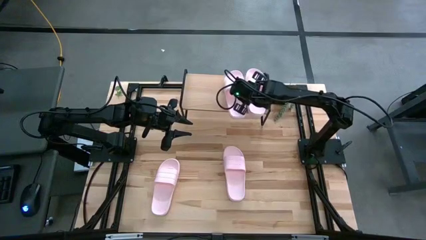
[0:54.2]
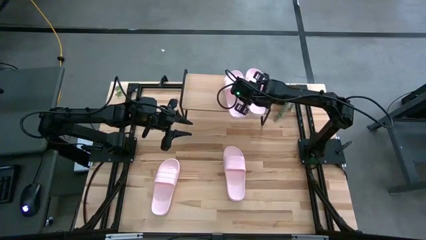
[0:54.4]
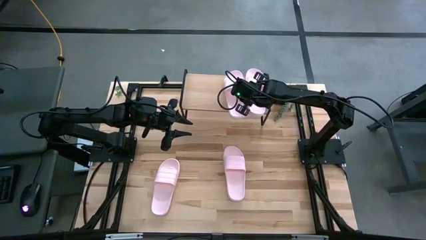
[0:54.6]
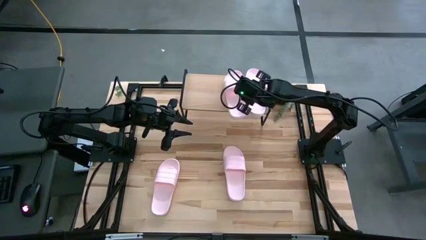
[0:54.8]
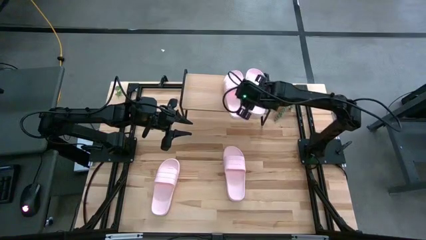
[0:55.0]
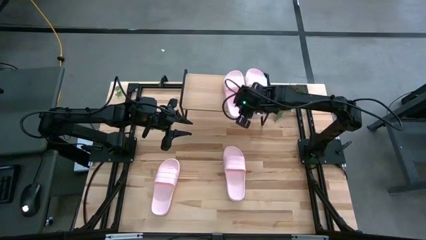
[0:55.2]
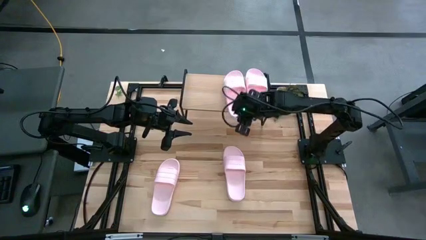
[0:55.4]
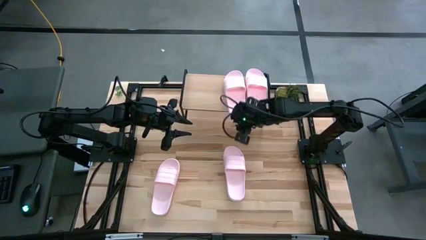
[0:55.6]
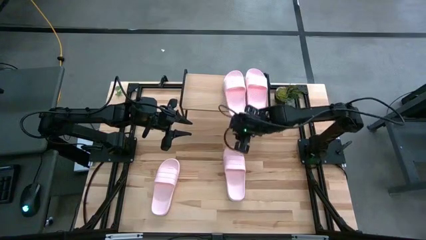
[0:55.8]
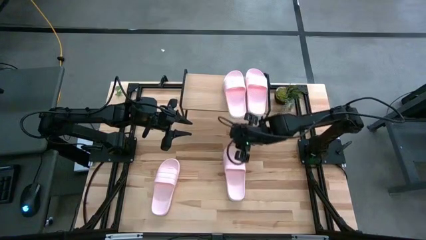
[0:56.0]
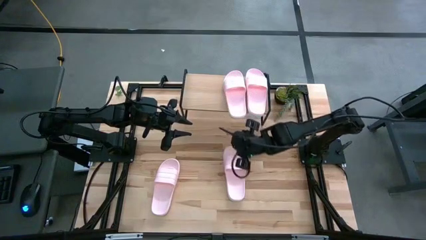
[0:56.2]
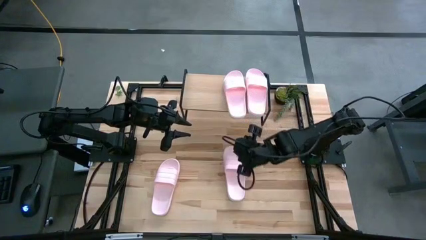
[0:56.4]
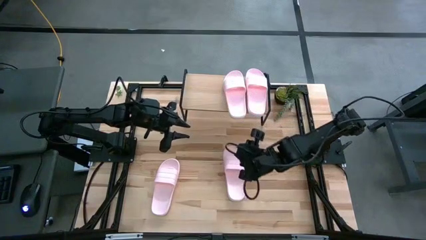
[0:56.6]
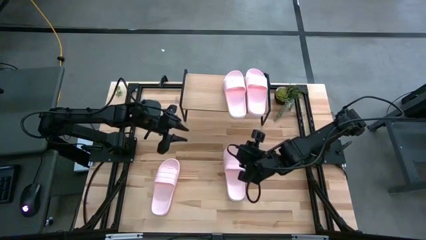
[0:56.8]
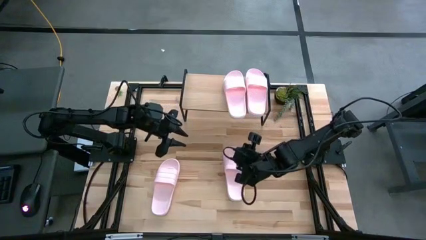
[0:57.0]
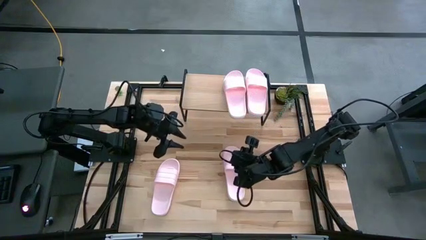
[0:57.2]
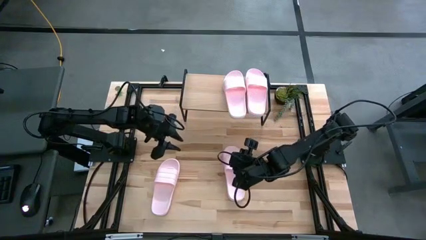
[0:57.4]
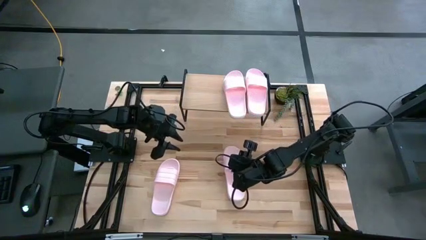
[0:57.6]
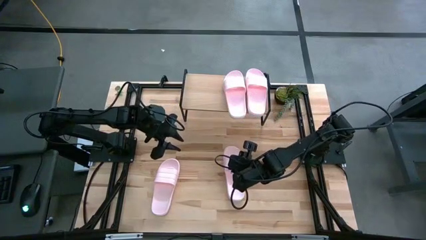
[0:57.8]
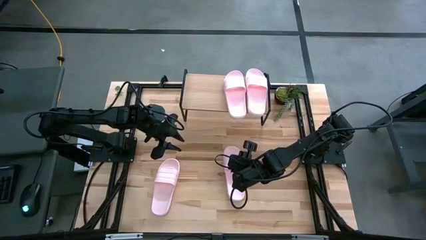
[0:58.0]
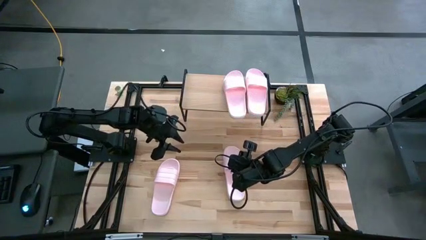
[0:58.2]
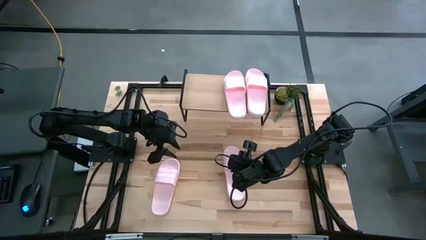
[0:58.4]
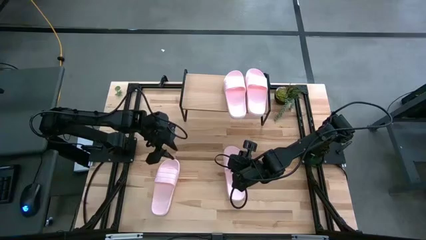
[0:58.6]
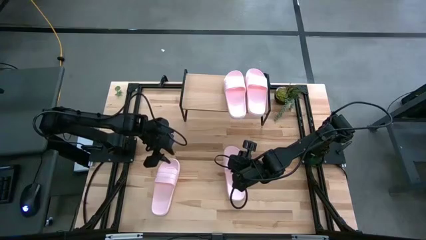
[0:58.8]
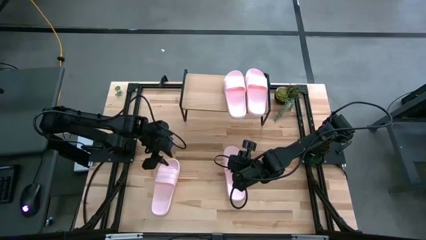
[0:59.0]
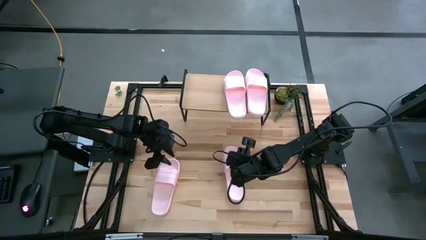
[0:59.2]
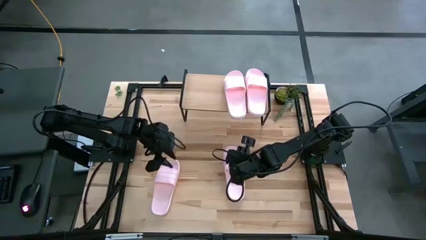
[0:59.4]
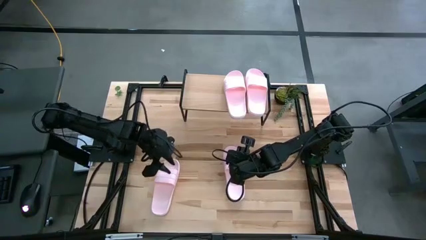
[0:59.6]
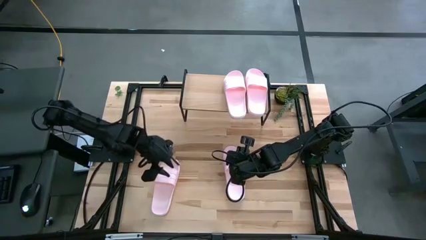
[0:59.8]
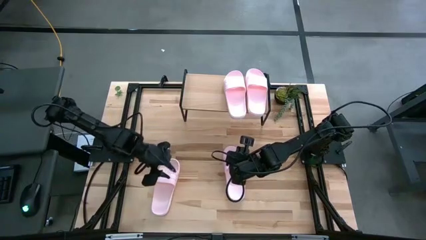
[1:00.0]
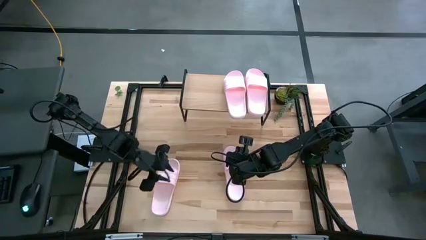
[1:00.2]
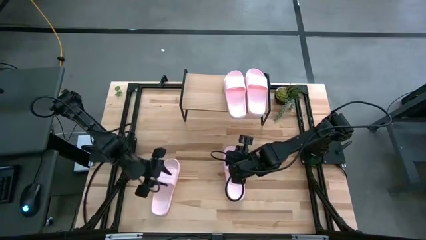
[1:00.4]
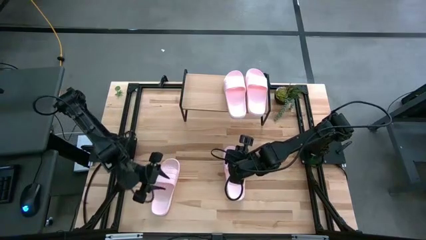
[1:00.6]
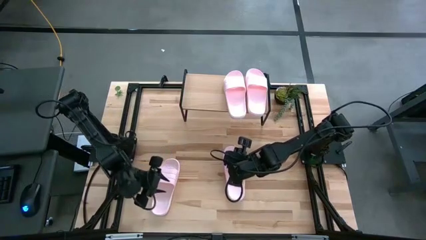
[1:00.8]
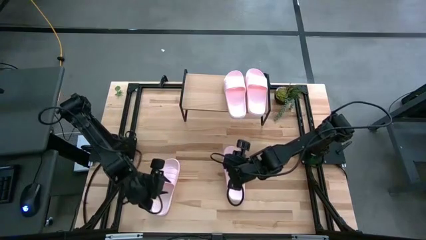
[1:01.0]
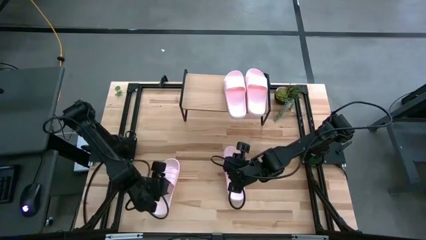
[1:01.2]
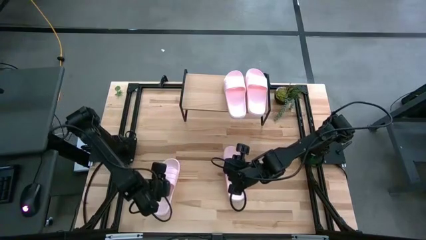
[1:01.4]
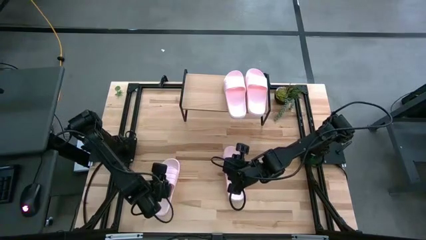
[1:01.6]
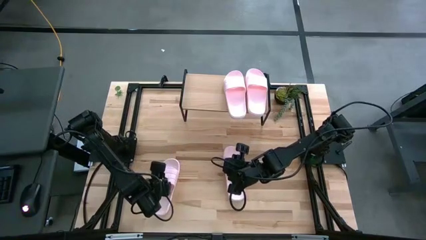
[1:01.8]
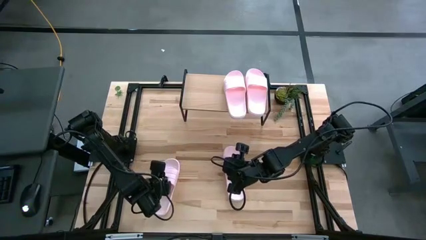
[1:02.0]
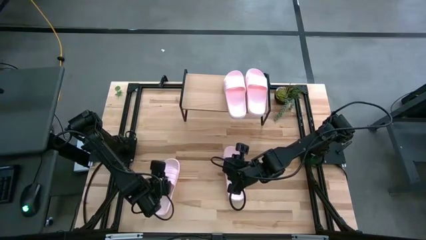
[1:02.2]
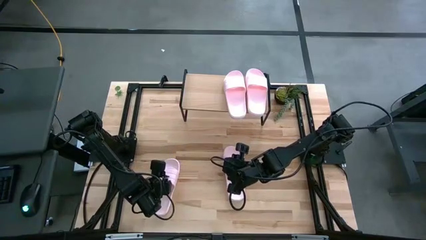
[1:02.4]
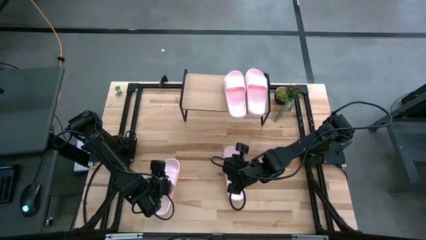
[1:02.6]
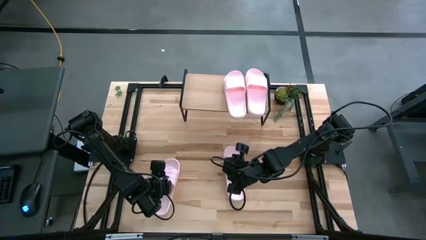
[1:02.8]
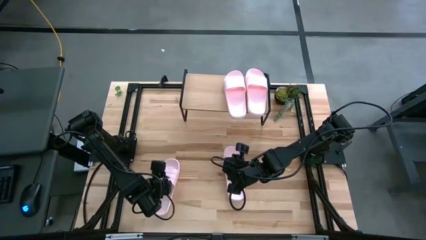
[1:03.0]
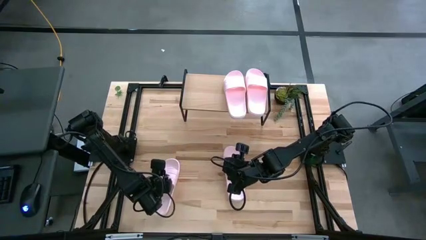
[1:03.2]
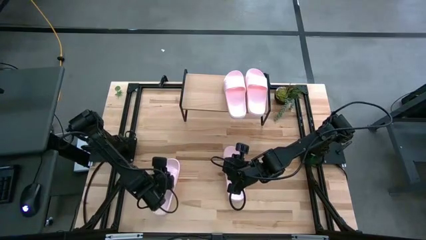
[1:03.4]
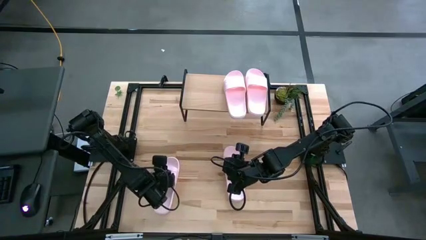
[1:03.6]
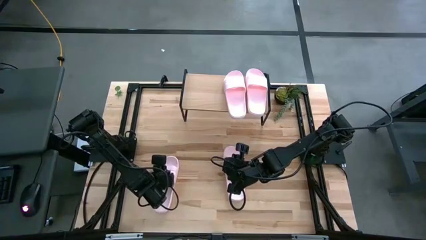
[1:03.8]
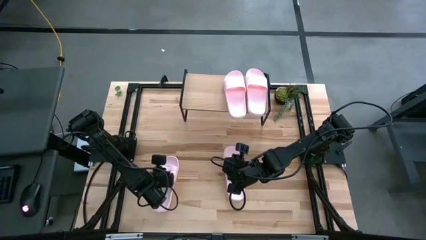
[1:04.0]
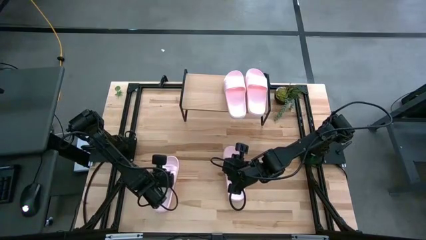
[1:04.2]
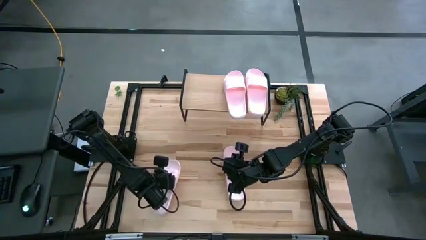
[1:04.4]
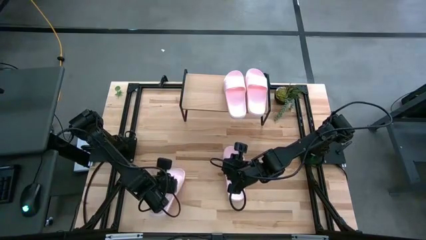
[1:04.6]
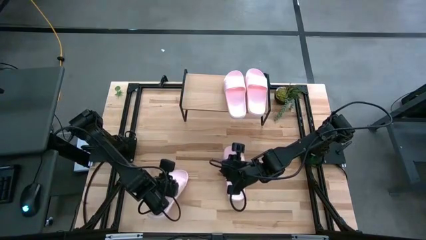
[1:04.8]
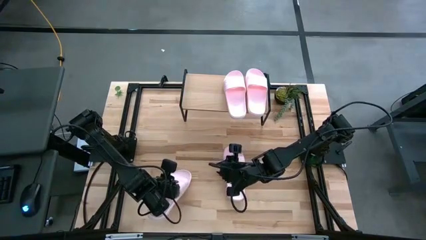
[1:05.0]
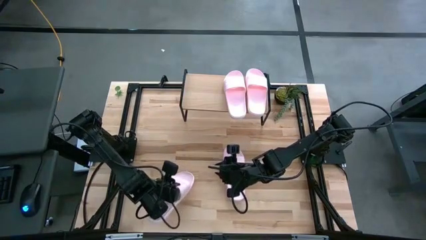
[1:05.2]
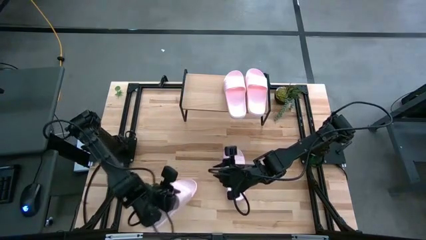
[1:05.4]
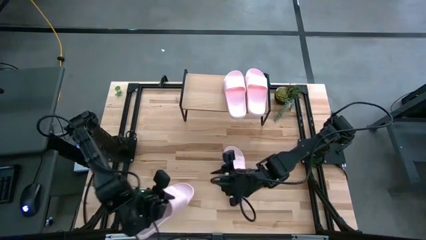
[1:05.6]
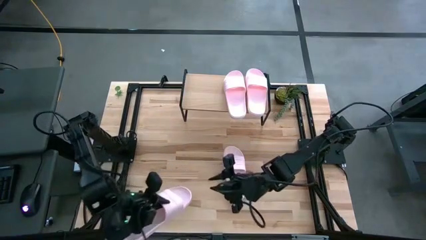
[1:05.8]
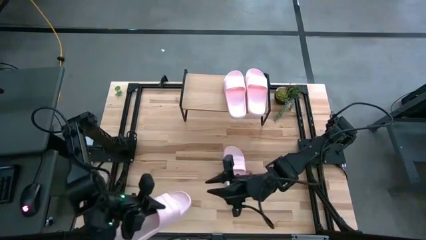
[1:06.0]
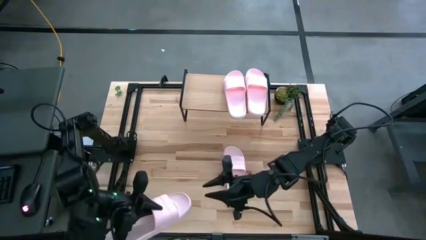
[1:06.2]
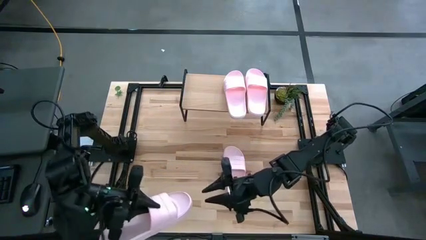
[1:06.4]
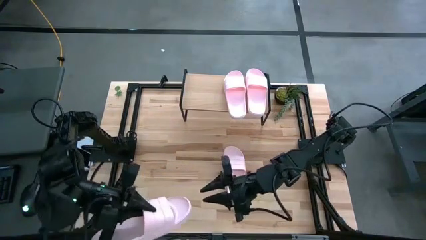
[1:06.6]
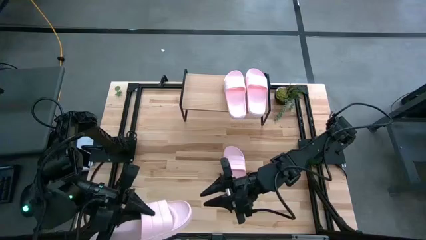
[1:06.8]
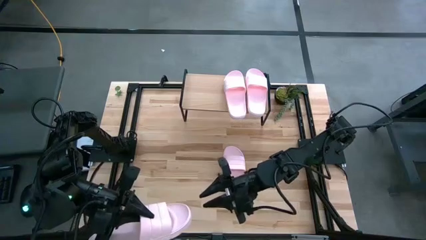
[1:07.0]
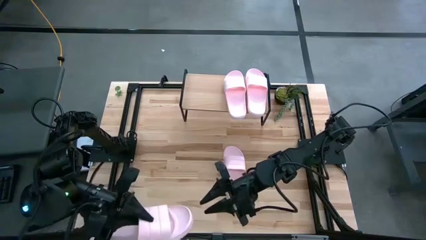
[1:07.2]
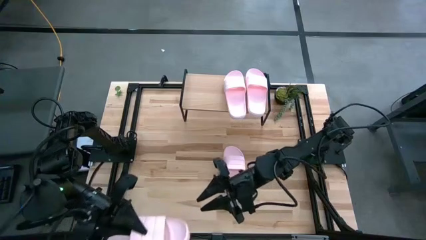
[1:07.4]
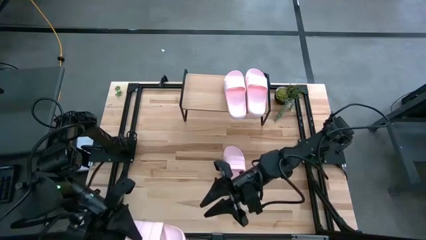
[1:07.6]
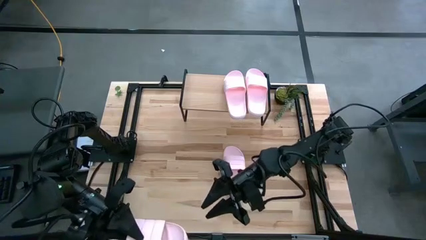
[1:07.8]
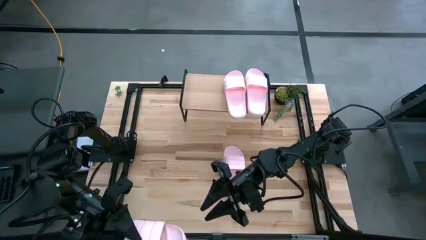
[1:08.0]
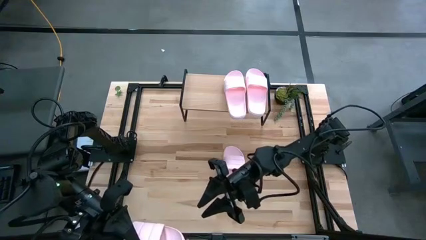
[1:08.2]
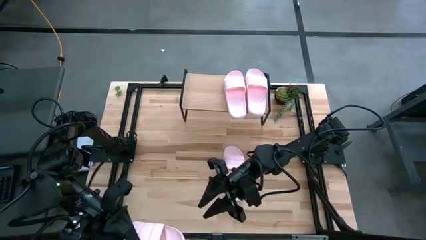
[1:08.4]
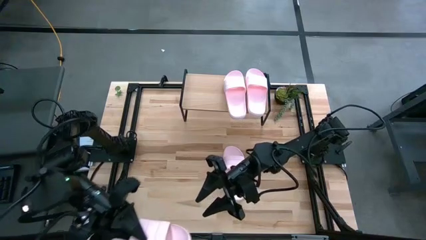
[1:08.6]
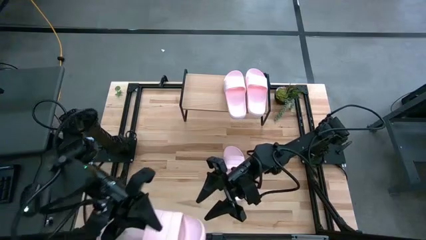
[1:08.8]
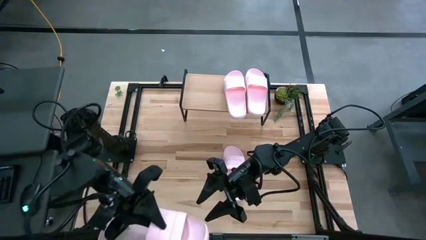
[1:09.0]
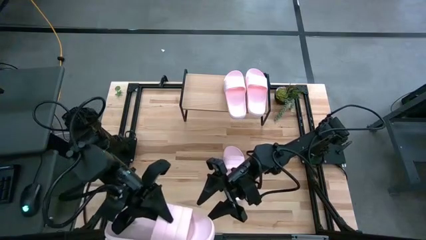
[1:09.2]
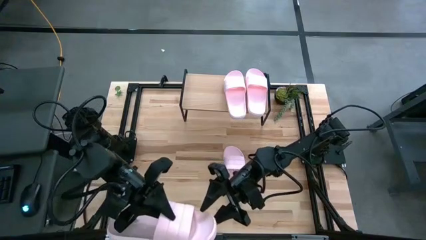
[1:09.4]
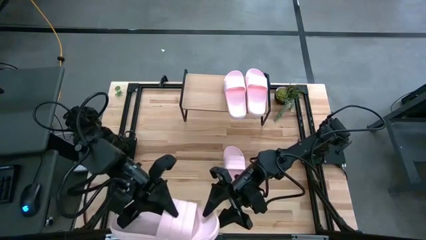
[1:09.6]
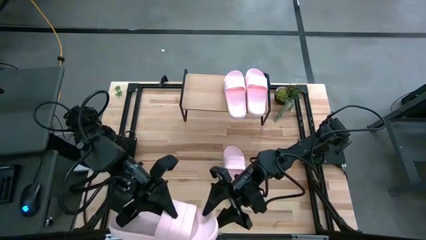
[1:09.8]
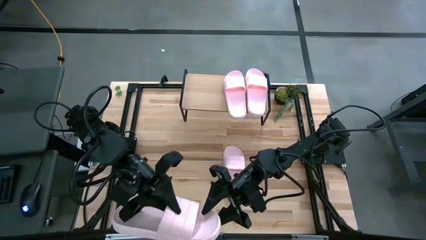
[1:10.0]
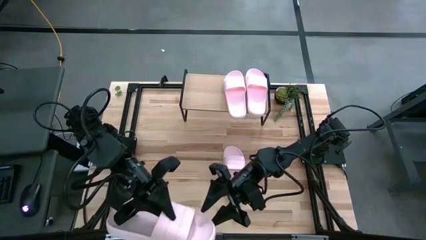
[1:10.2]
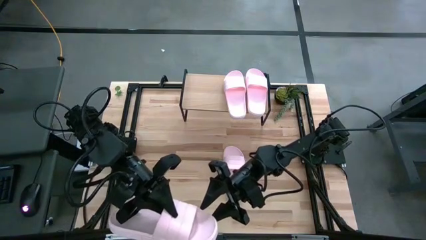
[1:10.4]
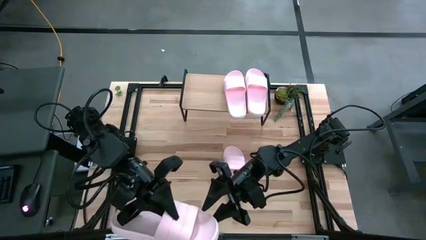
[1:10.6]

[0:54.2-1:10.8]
Task: Pick and place slides into the shelf
Put the pink slide on the shelf
